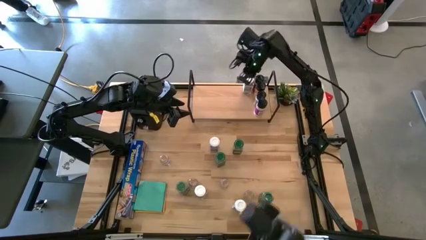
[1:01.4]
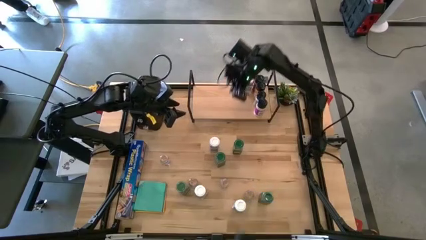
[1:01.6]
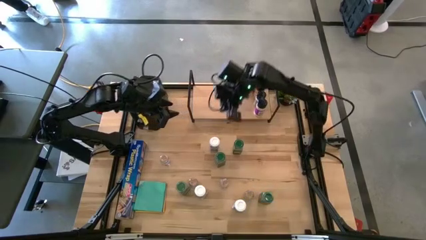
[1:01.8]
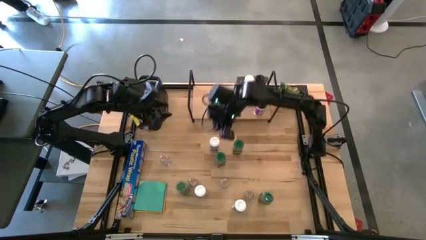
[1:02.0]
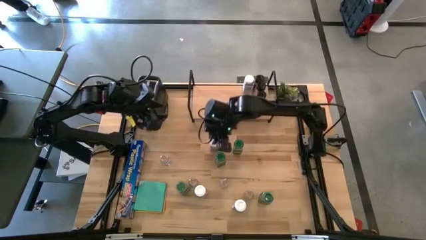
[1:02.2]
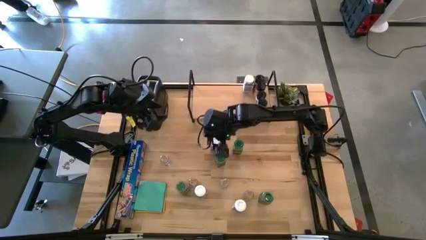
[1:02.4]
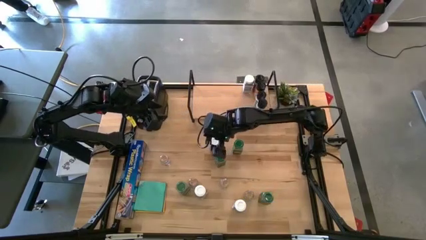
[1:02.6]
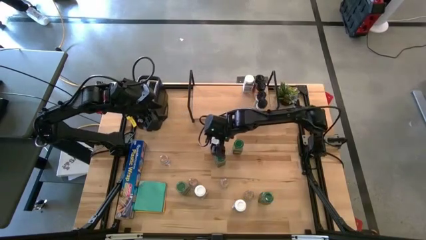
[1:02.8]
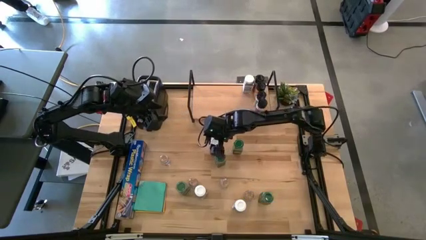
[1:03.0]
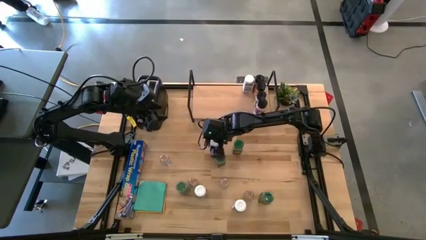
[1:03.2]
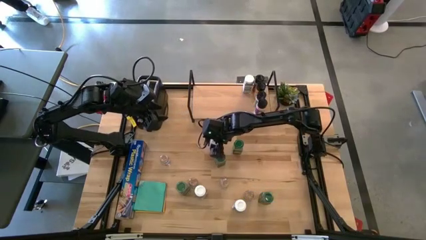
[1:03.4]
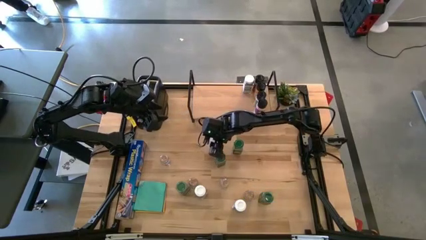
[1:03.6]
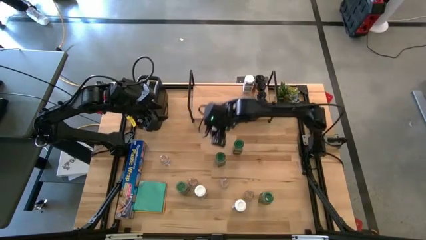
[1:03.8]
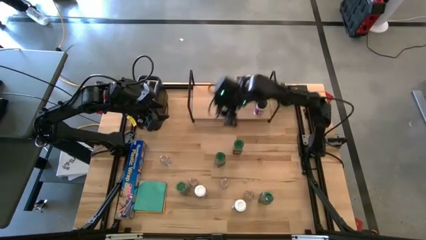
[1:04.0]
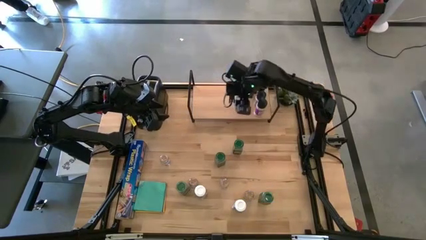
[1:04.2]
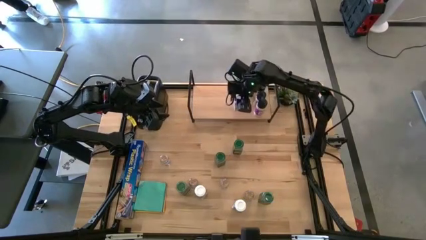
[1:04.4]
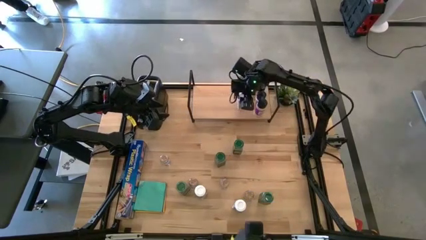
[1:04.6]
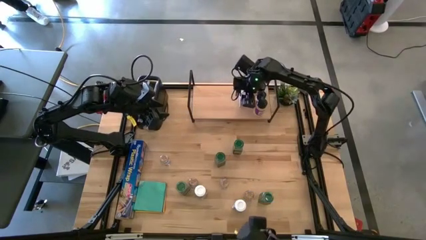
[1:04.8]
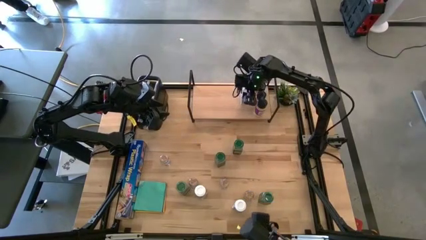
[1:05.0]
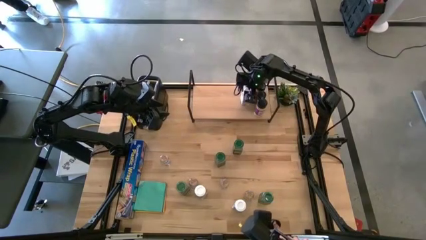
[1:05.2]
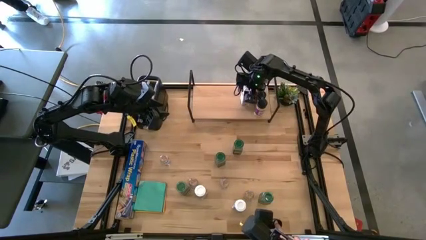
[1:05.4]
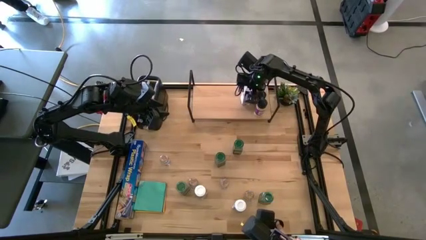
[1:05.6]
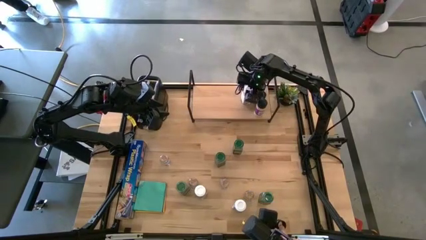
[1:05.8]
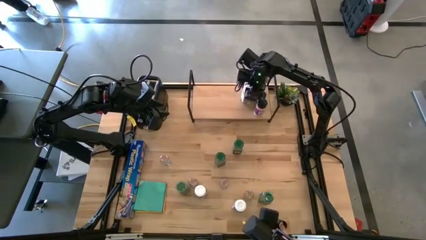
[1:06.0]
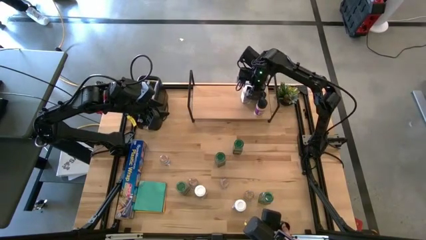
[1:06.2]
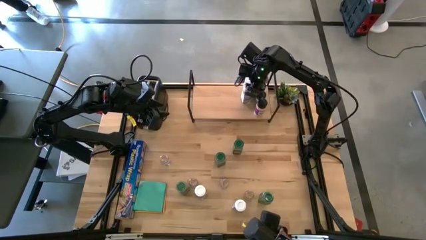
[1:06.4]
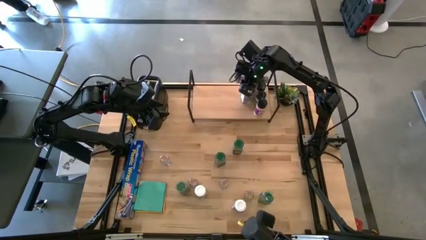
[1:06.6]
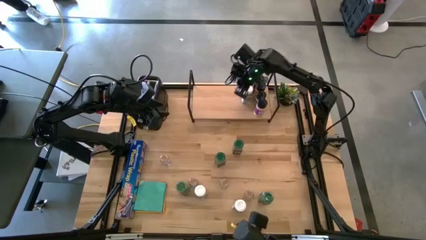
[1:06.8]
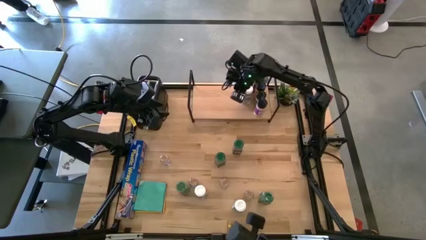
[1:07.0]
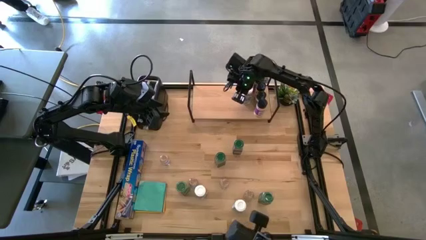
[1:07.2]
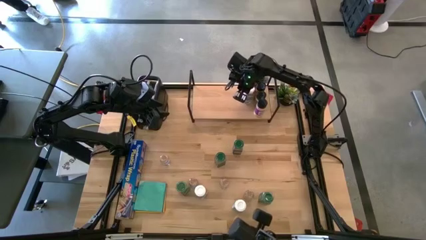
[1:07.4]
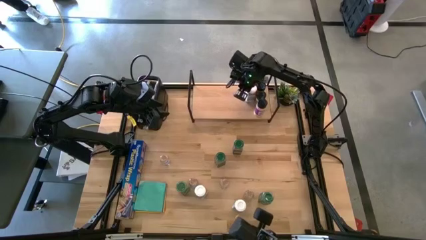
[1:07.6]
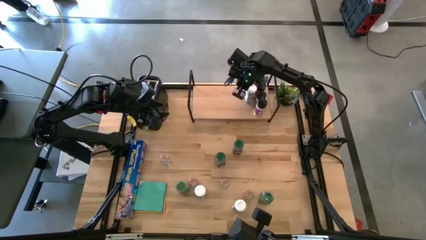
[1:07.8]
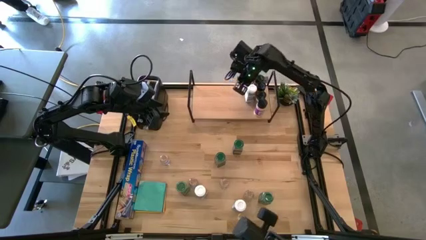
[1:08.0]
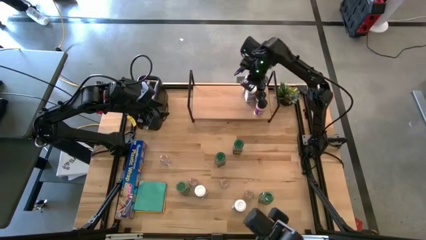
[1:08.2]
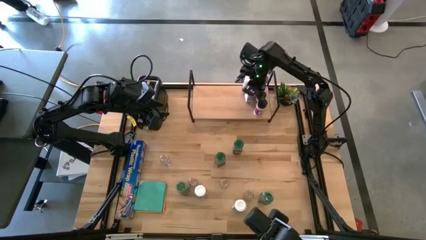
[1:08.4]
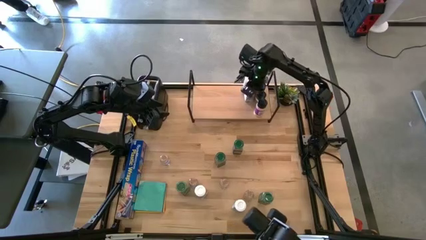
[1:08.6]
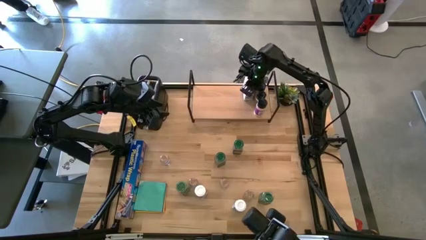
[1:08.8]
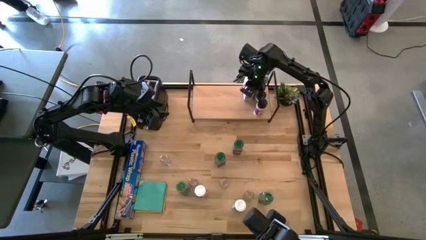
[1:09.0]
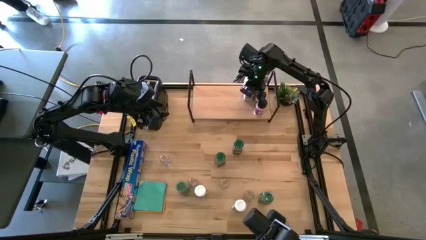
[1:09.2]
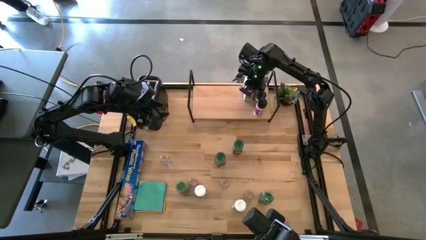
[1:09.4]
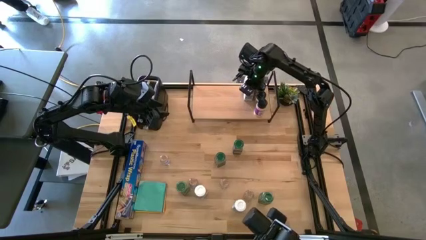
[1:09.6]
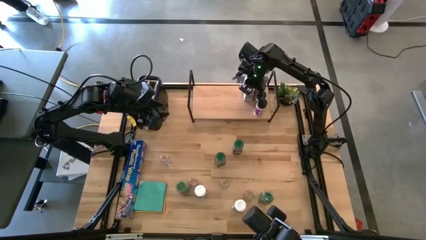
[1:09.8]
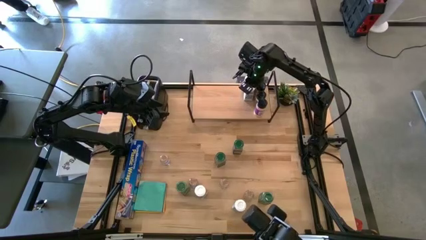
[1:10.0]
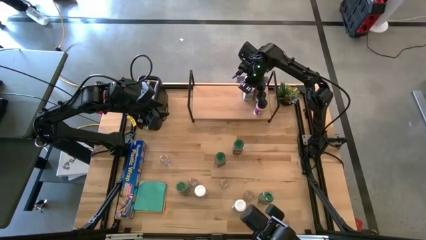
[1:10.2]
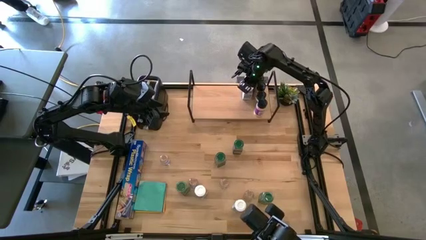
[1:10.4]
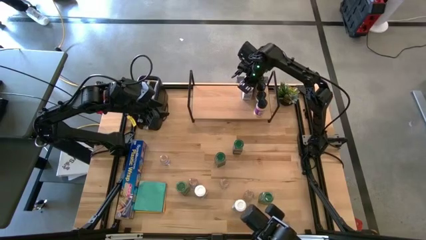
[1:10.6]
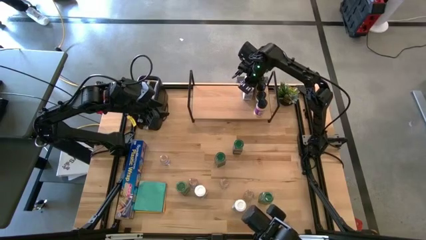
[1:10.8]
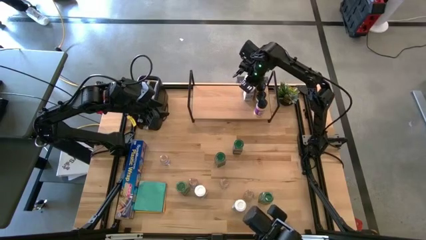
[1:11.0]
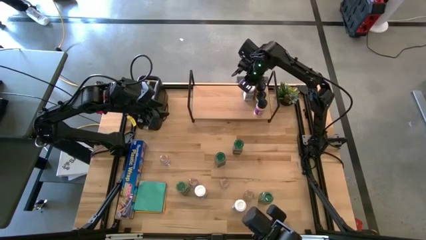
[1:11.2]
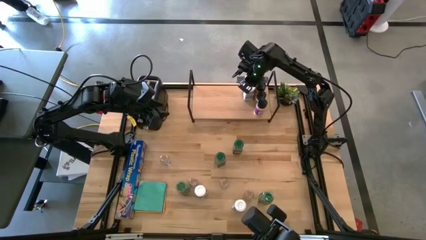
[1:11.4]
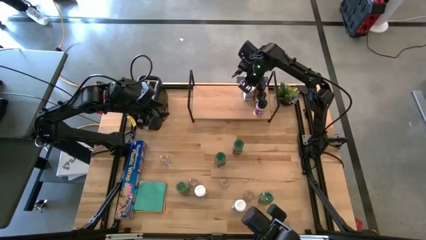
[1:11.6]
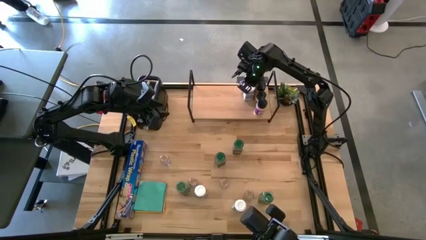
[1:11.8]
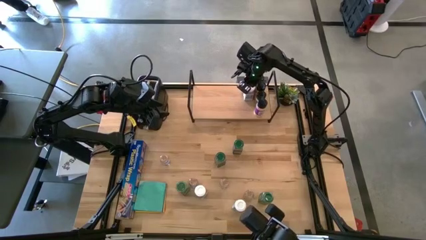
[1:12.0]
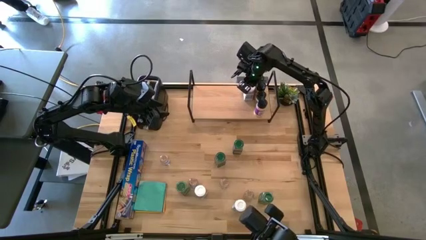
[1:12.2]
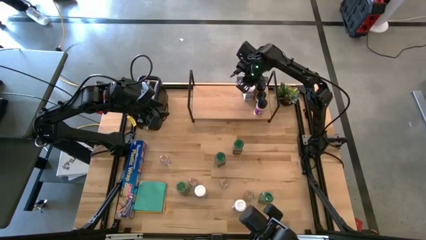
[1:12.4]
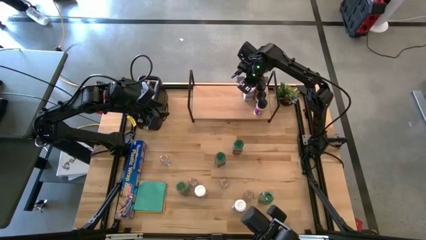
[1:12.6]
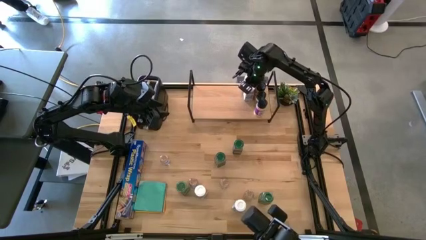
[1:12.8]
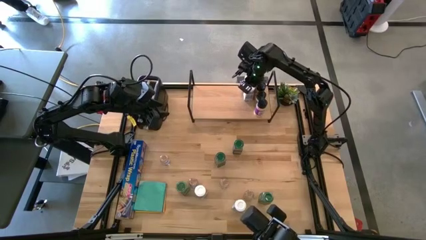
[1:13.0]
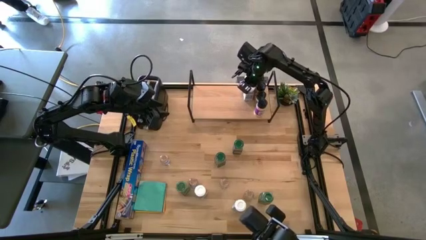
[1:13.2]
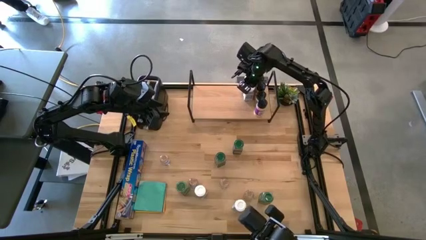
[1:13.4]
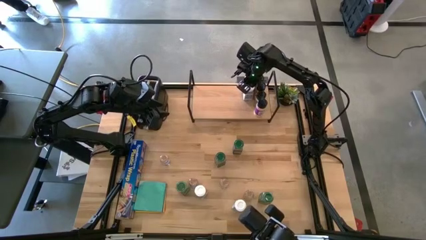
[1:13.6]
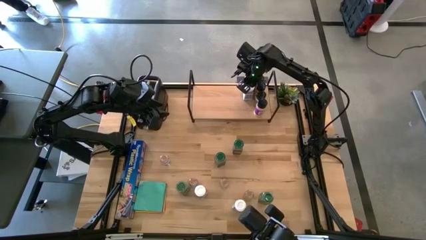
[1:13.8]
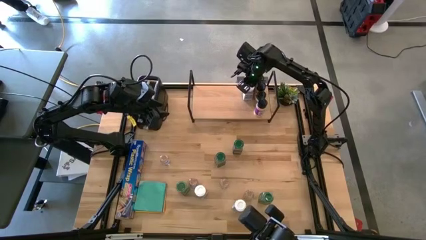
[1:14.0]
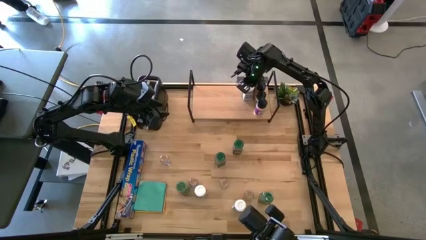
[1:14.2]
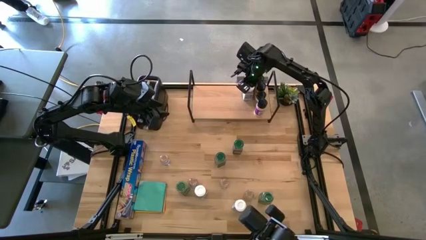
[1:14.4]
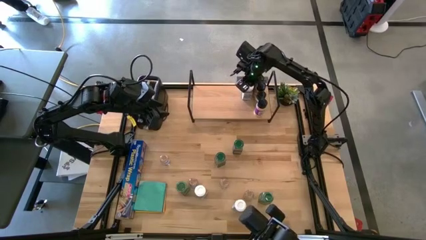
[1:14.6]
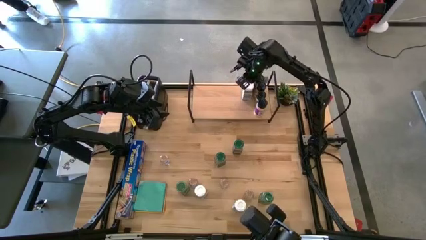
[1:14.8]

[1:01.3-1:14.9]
Task: Shelf spices
Put the top white spice bottle on the shelf and align with the other white spice bottle

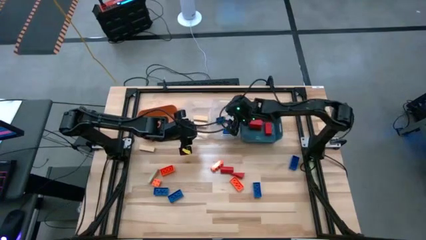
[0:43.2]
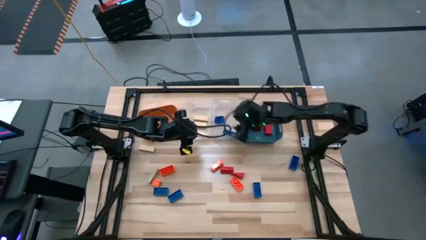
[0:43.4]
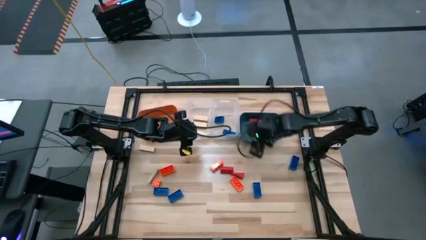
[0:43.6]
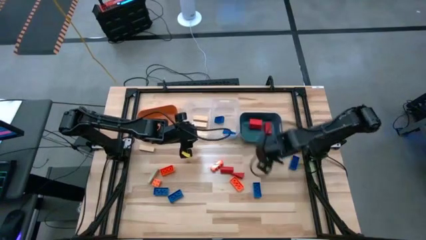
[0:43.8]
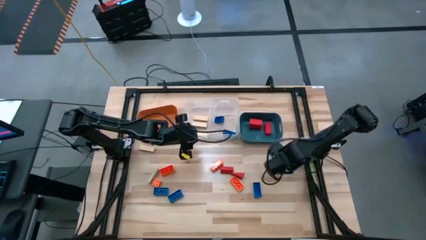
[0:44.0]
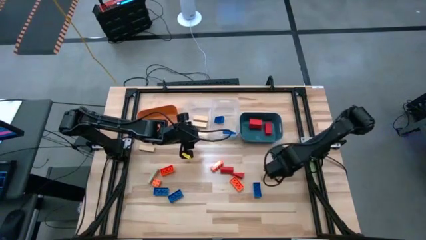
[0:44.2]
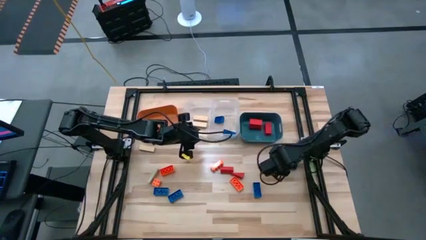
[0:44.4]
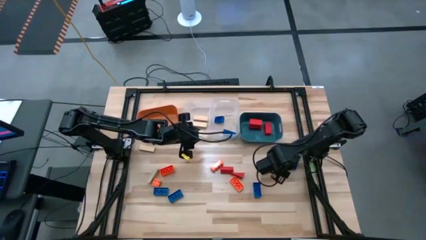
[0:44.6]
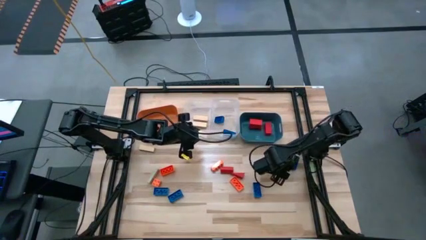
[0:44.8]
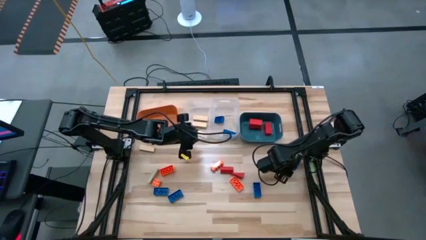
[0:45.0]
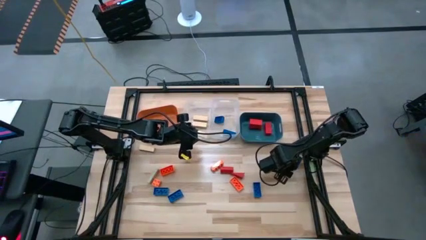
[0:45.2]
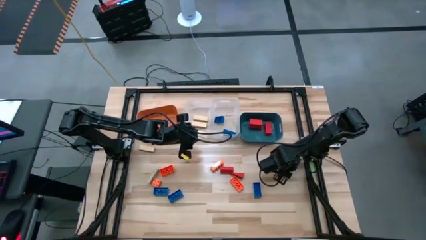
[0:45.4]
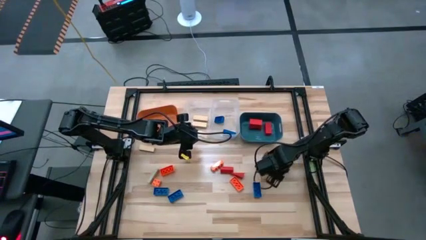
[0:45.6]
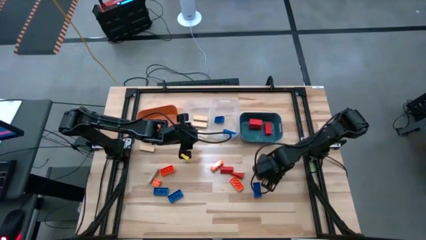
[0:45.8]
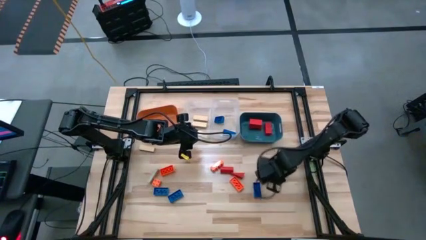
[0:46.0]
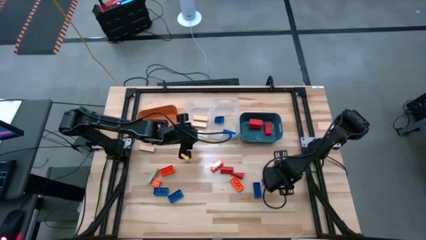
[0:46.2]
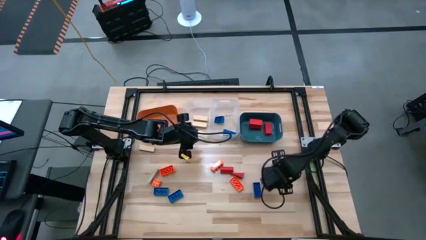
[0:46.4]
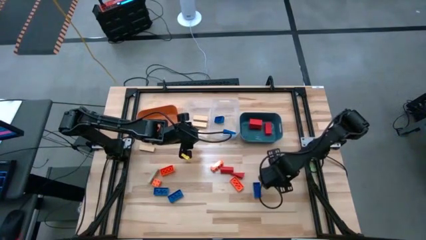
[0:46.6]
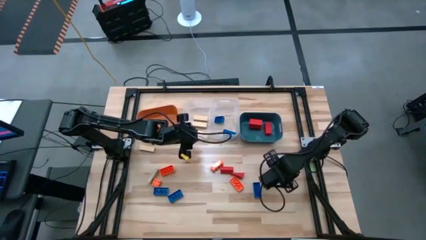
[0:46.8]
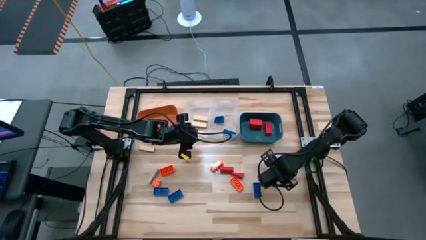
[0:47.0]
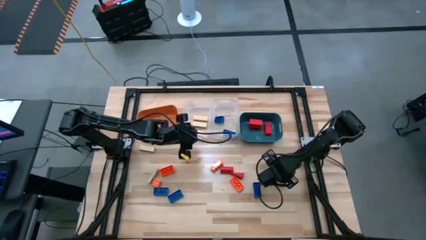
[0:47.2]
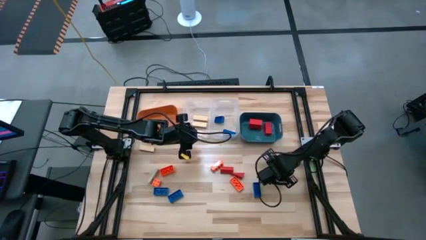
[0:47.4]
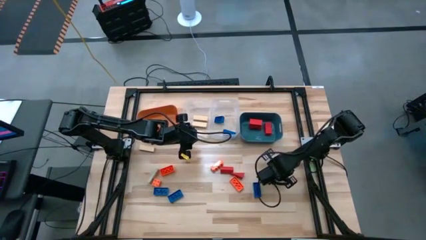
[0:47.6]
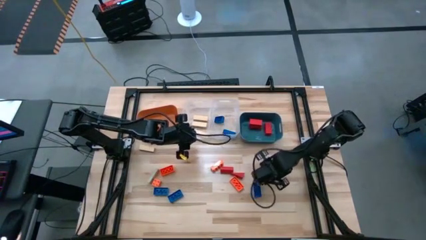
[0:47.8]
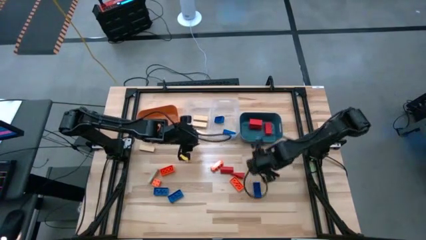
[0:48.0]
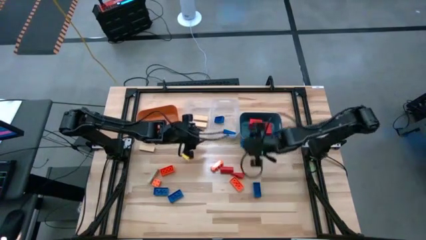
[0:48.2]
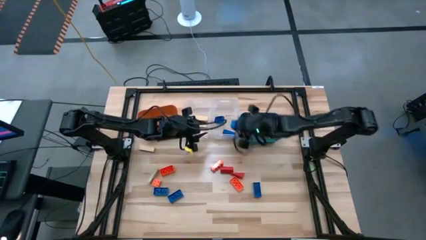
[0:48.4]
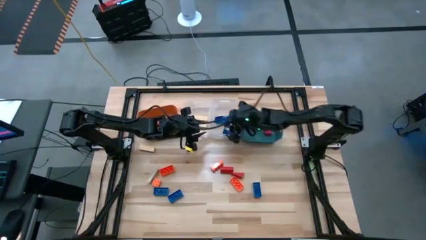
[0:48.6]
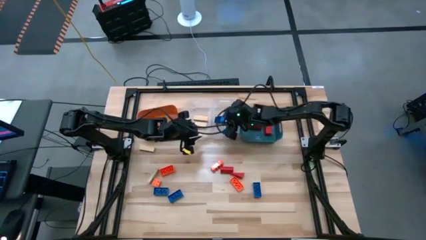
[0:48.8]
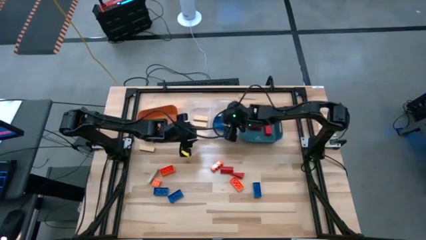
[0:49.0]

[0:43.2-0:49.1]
Task: Sort blocks
Put the blue game piece into the right transparent bin
